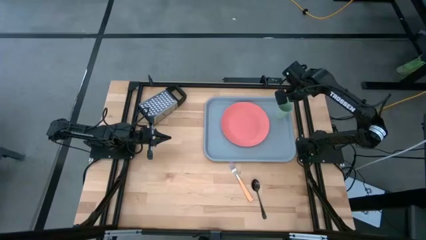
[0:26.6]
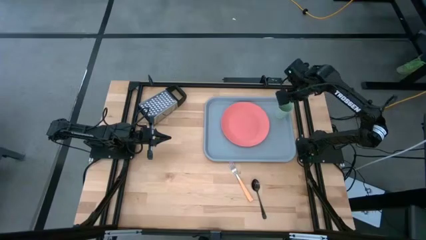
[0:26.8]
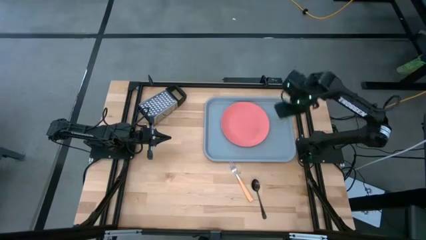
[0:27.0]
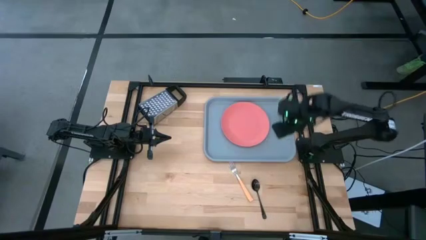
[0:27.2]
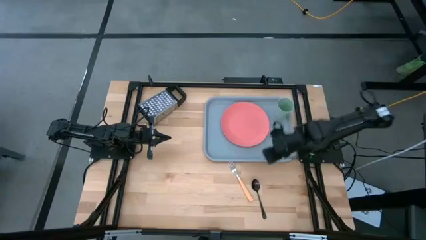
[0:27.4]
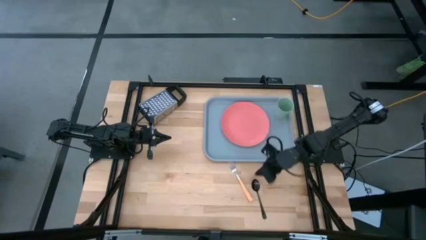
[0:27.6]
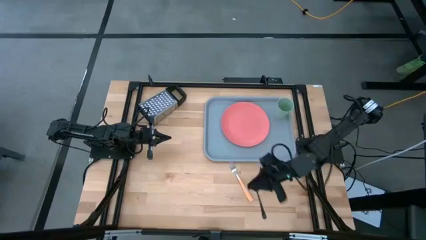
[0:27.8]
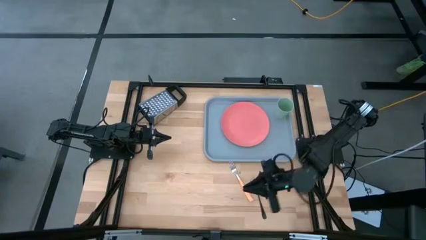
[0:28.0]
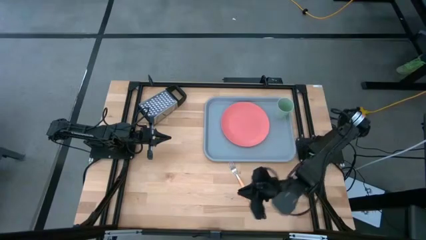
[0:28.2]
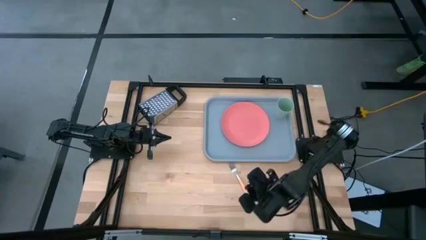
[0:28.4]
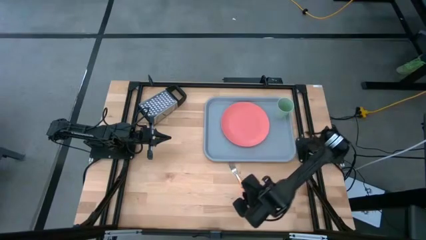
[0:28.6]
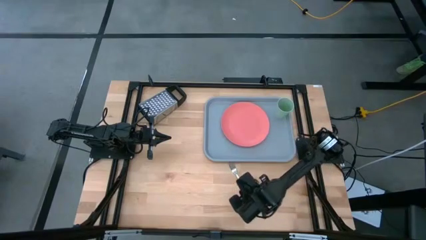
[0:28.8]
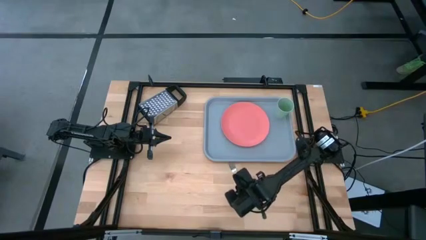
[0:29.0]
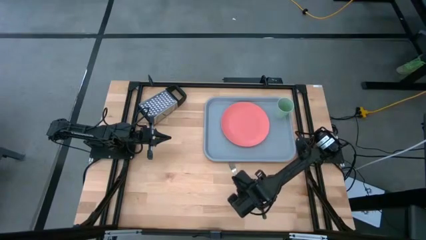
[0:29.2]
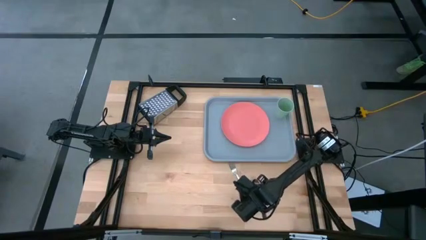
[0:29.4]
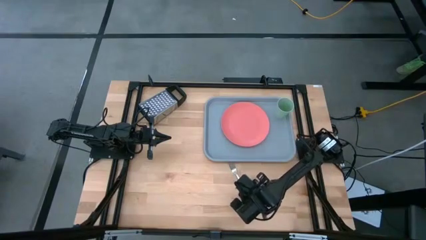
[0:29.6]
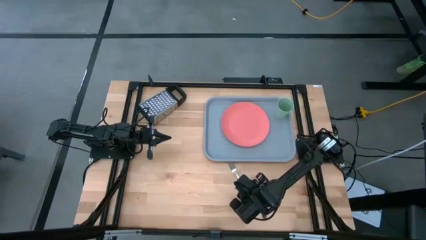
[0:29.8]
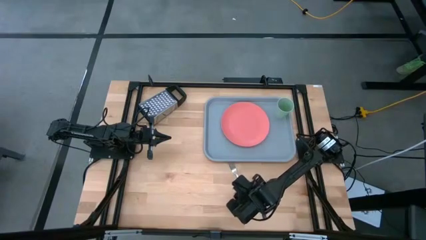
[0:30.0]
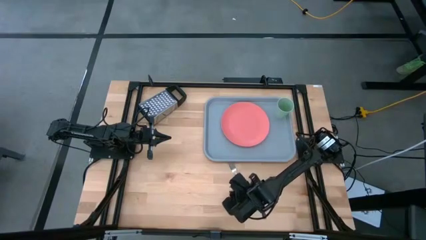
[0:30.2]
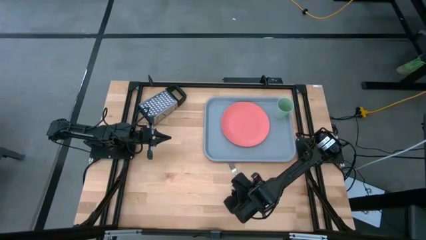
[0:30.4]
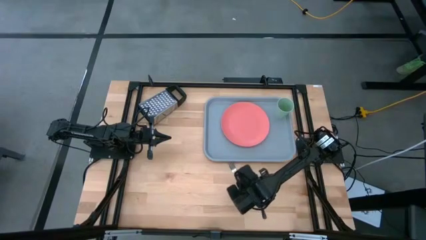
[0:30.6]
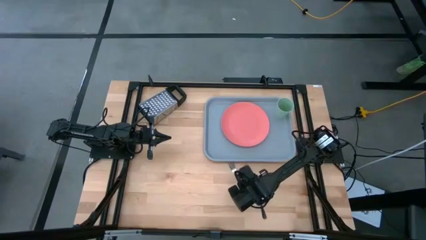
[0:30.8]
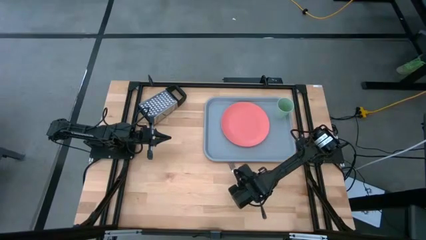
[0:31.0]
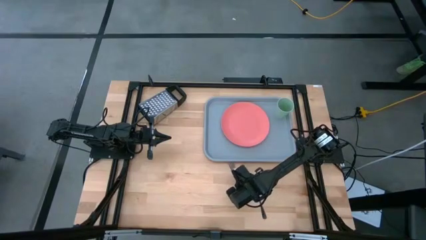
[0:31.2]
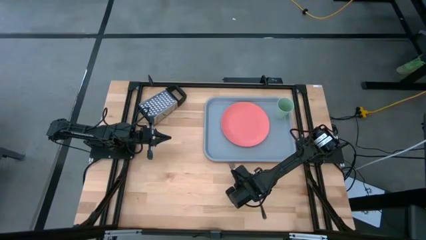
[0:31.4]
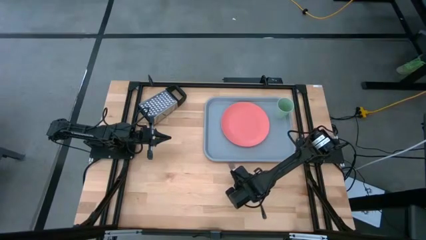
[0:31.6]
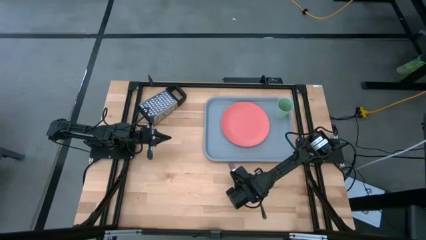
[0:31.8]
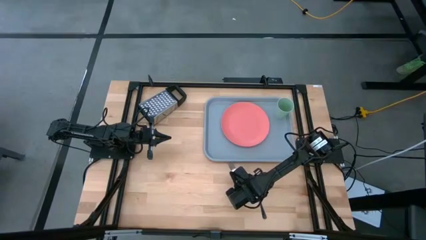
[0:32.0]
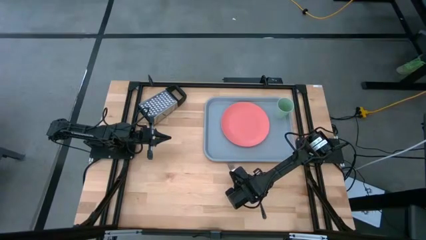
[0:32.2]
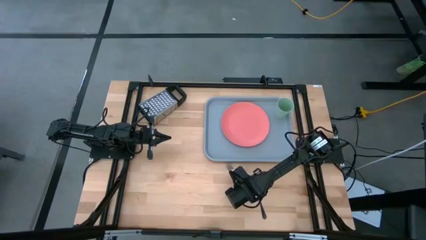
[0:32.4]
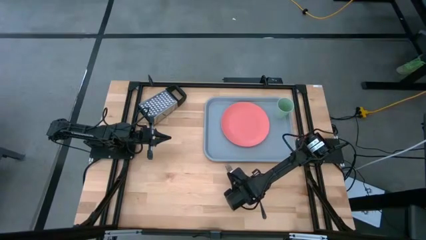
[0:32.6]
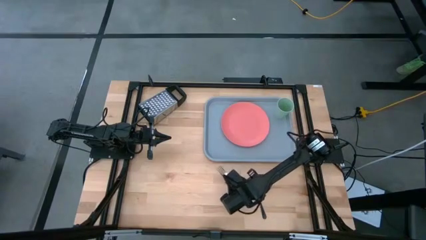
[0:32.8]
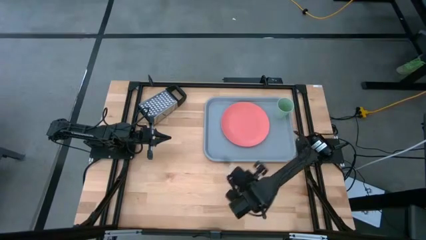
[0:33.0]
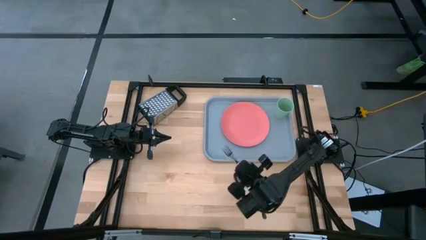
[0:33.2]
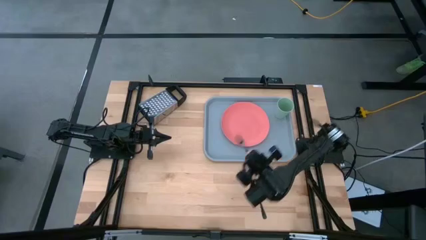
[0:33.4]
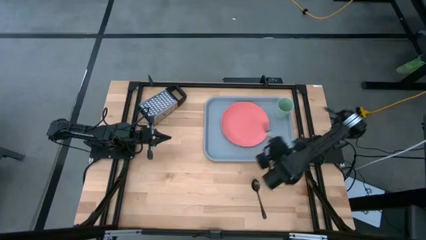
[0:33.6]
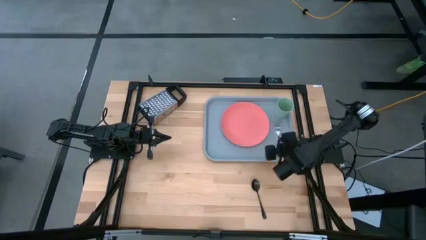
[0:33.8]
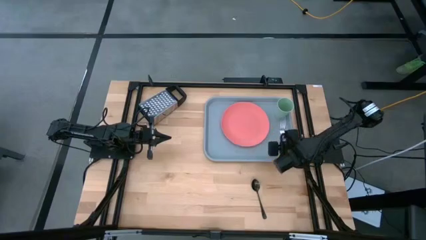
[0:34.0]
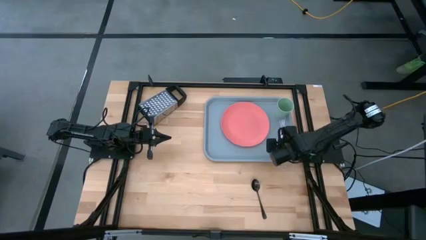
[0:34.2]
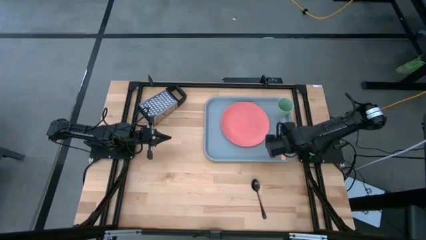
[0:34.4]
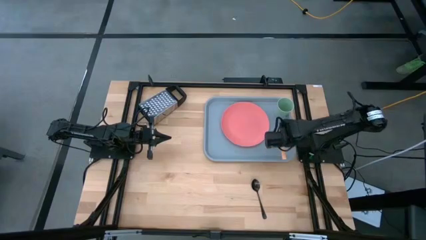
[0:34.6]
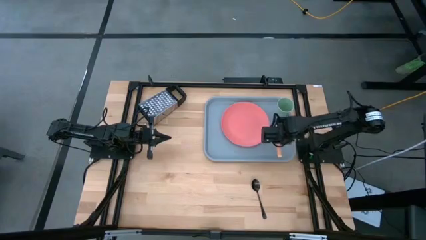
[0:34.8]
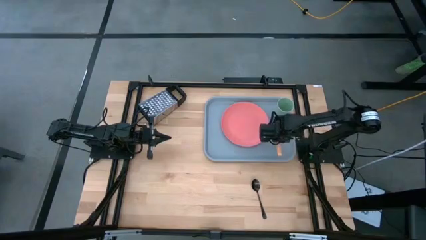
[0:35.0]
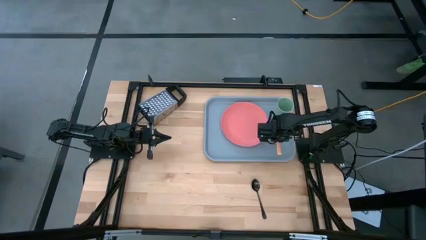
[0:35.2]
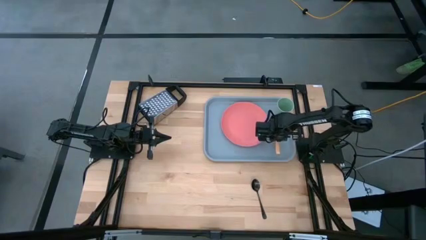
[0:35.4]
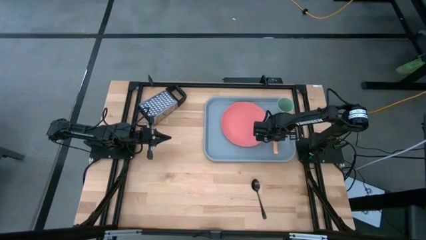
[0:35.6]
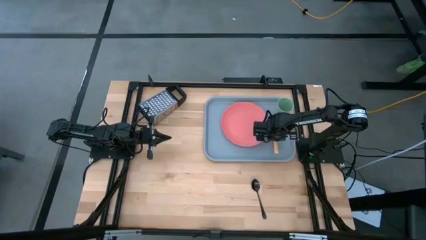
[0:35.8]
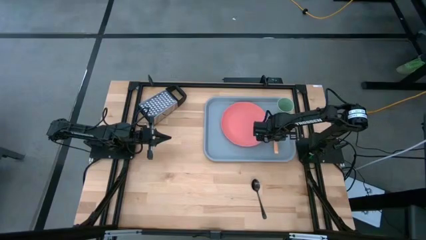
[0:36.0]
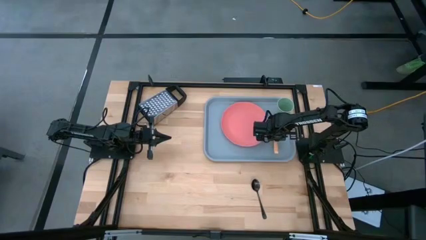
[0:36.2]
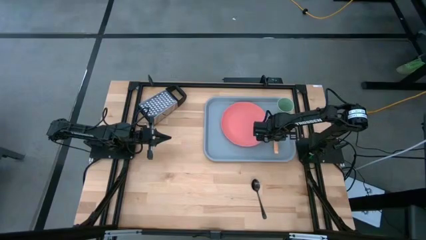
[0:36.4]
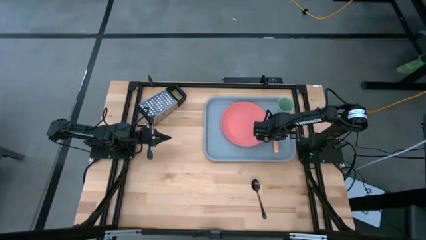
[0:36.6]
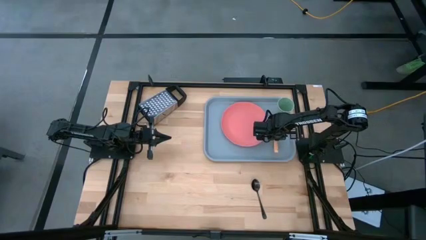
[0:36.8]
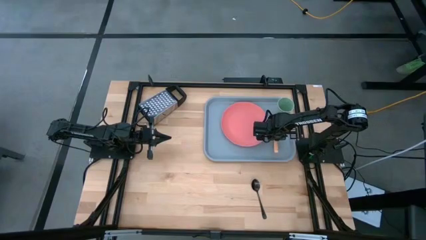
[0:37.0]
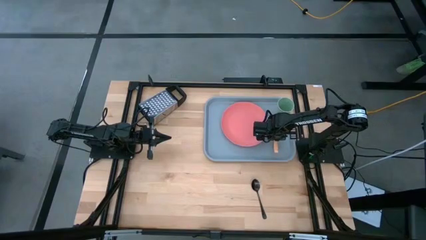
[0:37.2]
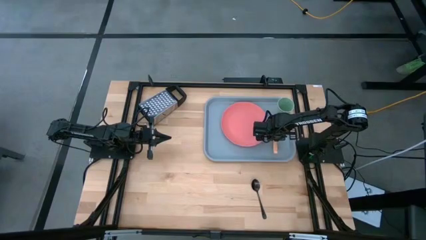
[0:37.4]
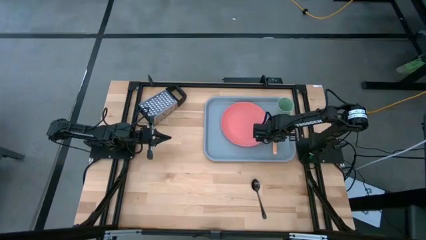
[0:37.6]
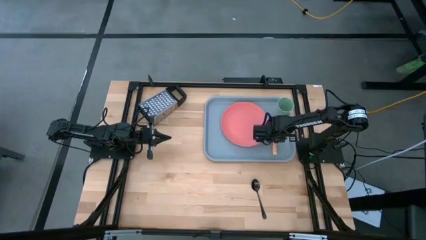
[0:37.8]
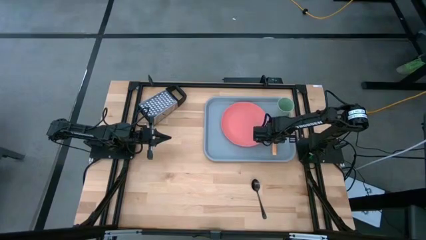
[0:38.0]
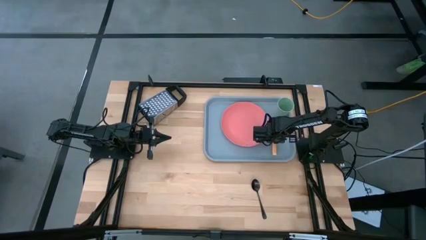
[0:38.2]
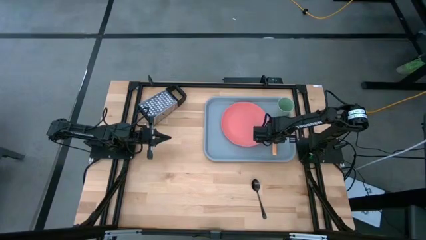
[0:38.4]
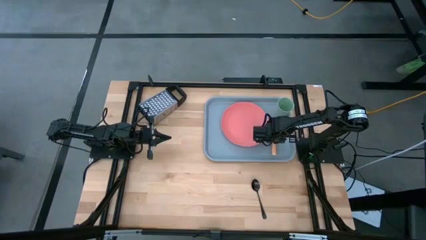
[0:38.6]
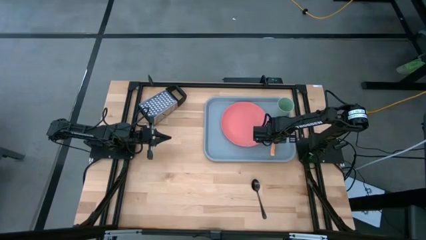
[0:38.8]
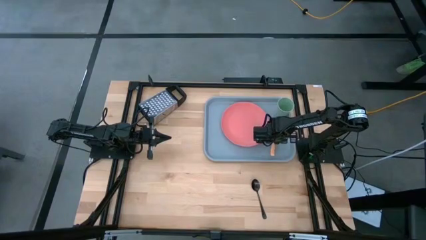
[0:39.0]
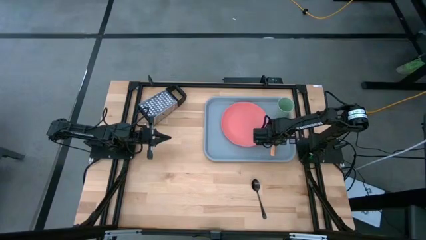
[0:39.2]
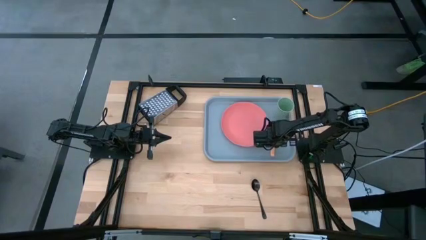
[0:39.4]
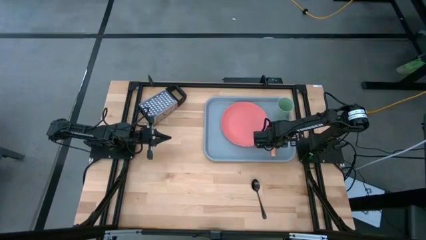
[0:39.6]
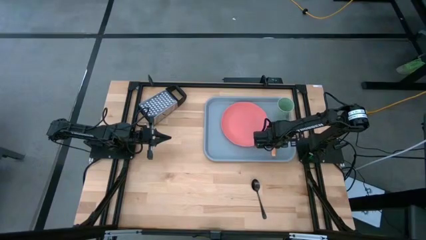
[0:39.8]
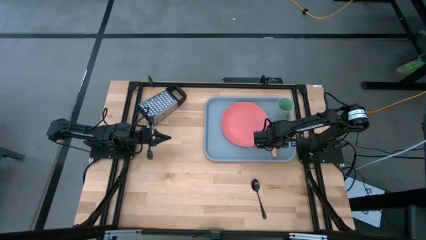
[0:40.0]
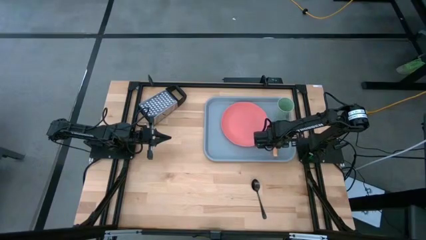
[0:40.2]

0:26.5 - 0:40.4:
Task: Pick and place plate/cup/fork/spoon on tray
Put the orange fork on the gray serving tray to the right side of the pink plate
